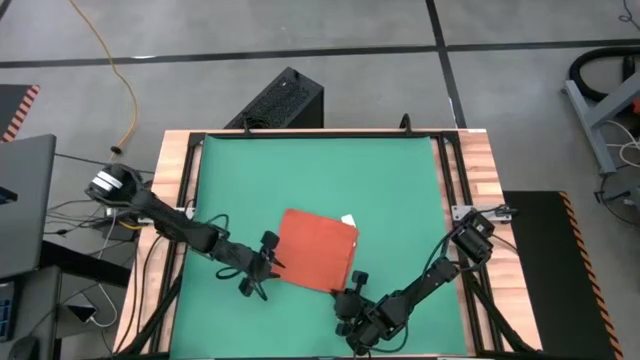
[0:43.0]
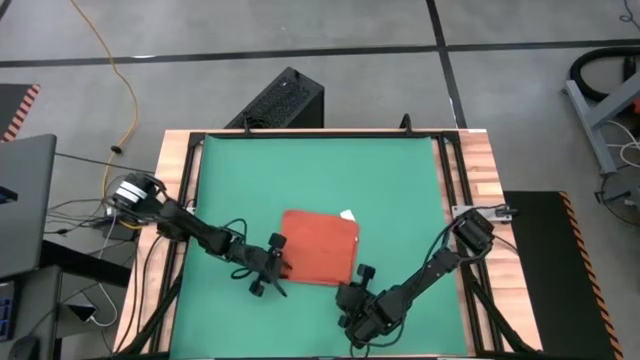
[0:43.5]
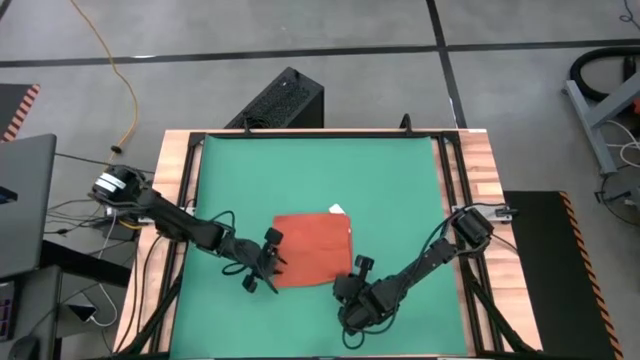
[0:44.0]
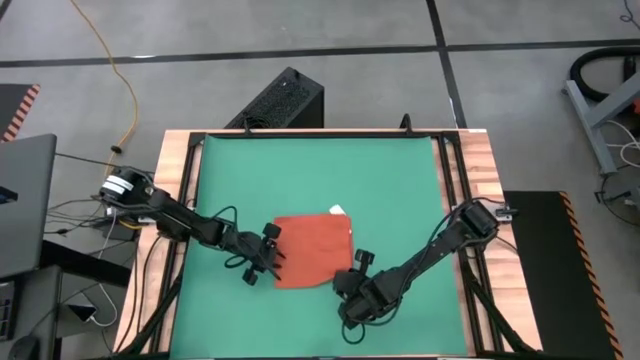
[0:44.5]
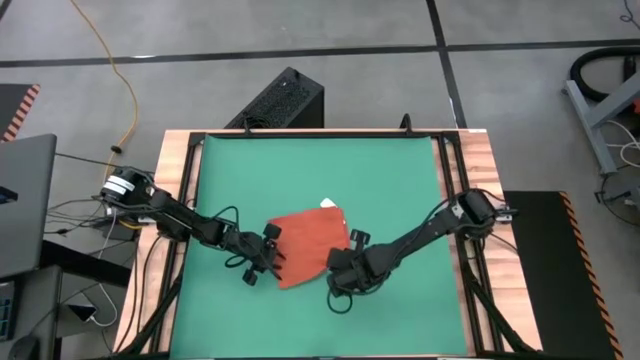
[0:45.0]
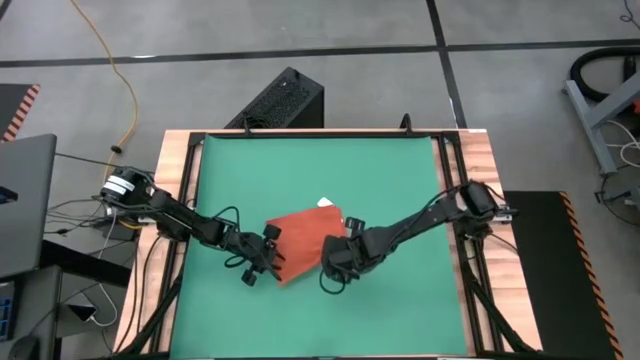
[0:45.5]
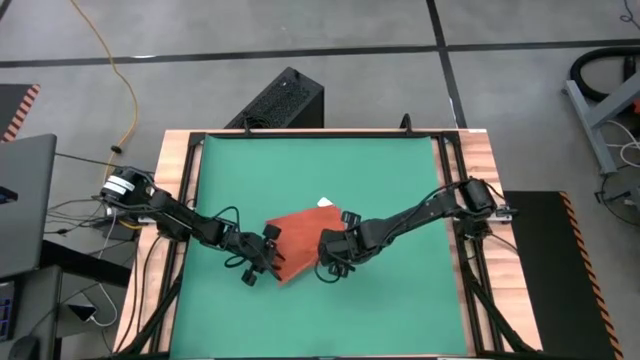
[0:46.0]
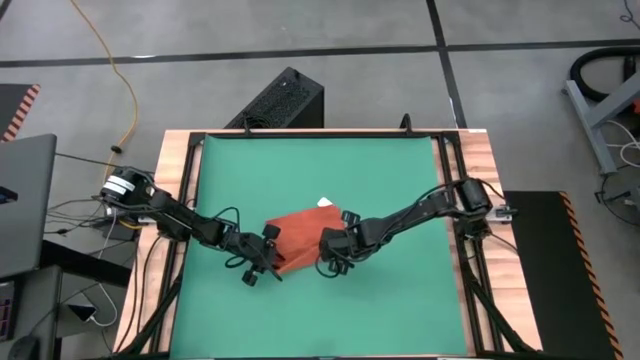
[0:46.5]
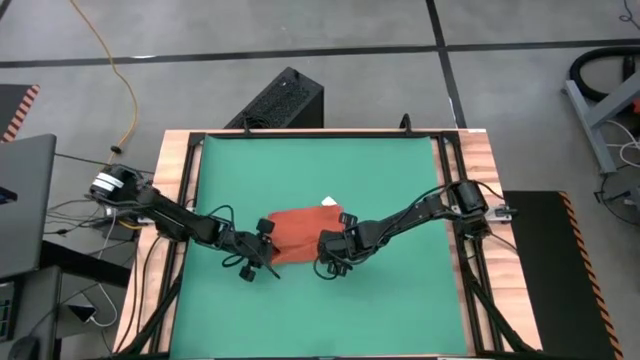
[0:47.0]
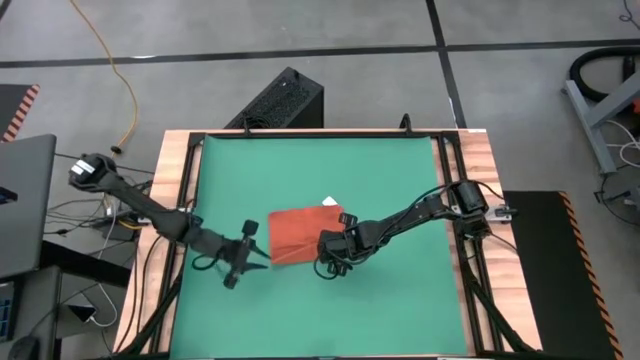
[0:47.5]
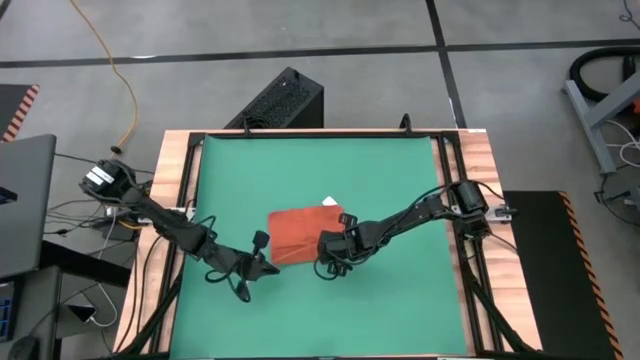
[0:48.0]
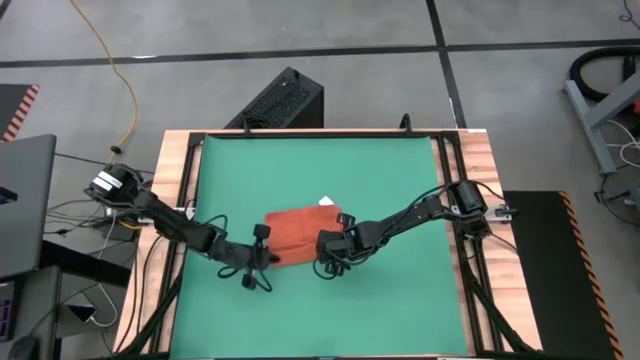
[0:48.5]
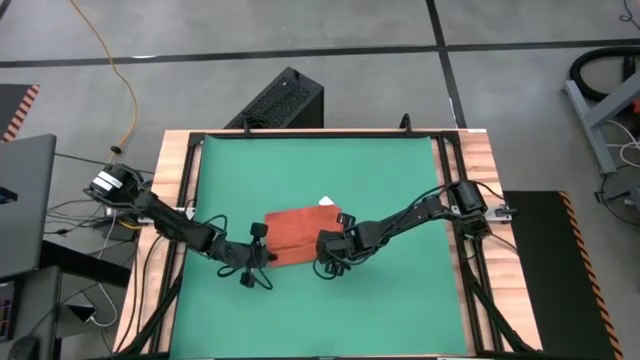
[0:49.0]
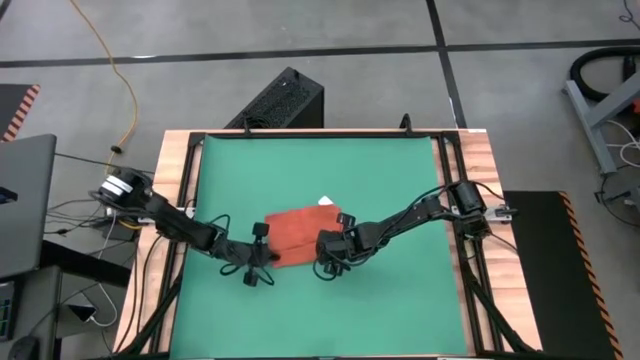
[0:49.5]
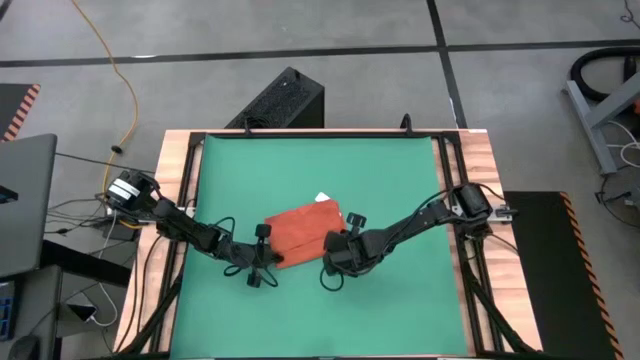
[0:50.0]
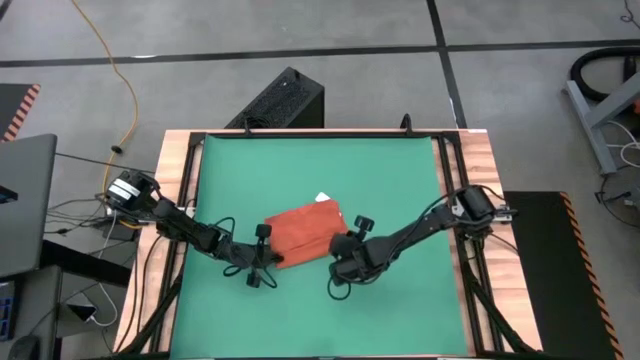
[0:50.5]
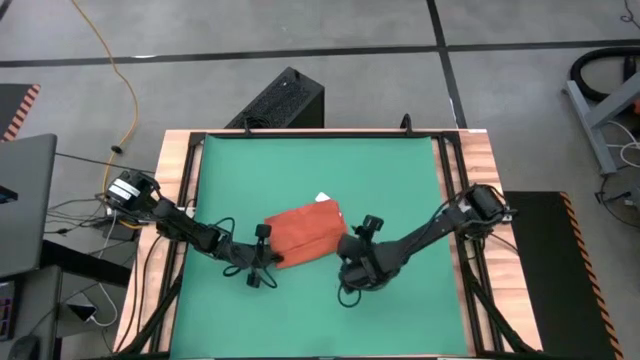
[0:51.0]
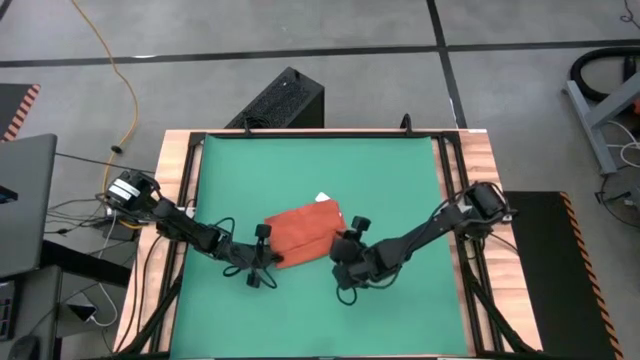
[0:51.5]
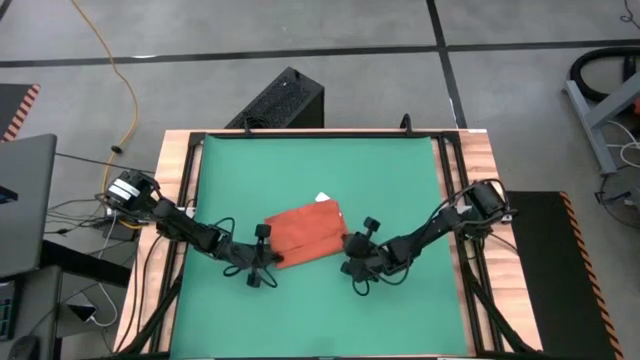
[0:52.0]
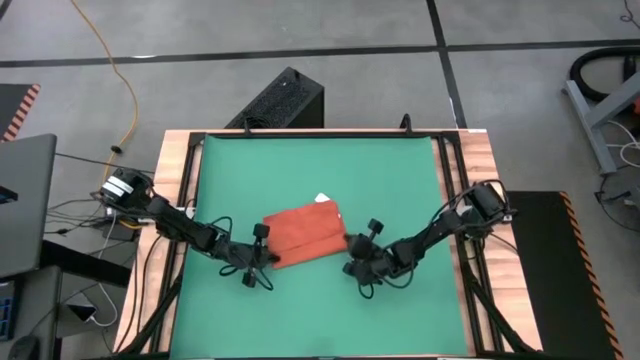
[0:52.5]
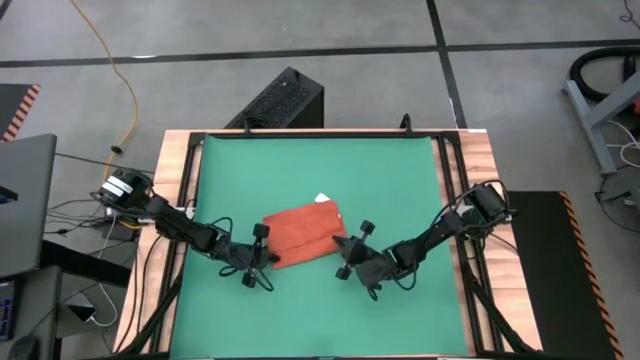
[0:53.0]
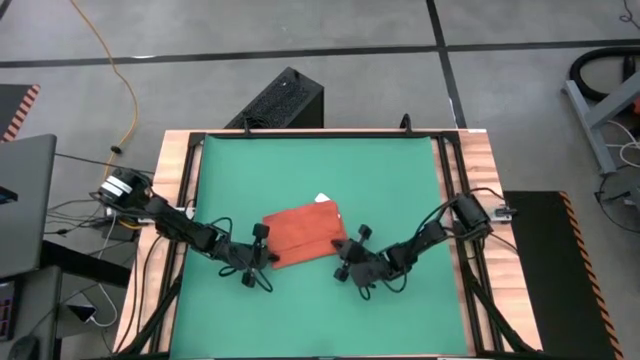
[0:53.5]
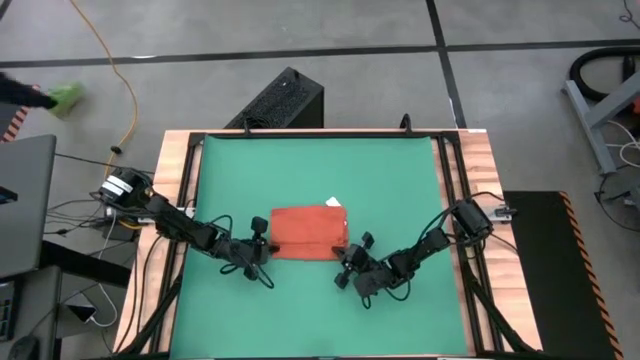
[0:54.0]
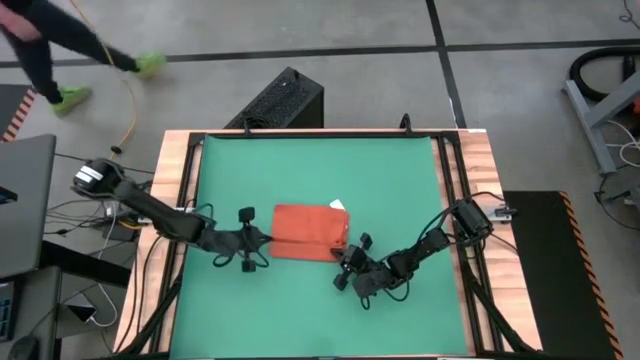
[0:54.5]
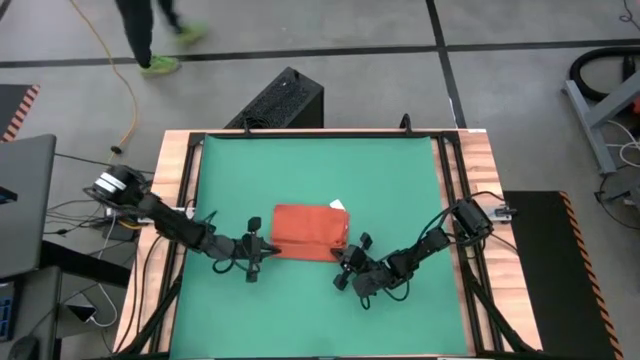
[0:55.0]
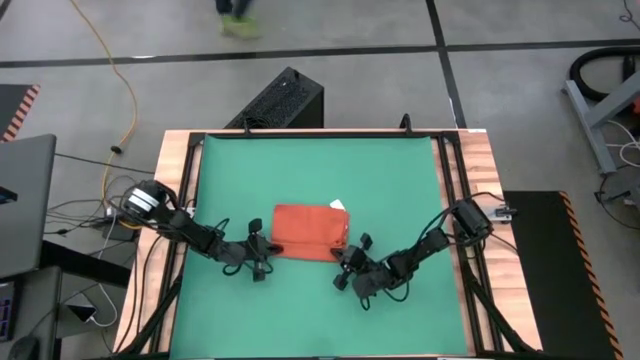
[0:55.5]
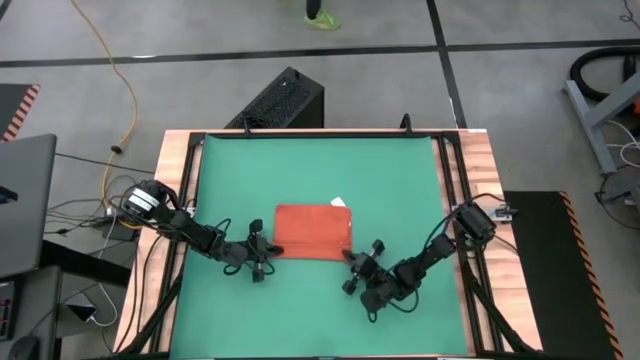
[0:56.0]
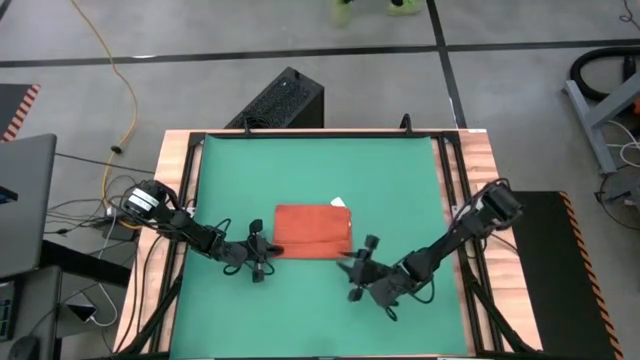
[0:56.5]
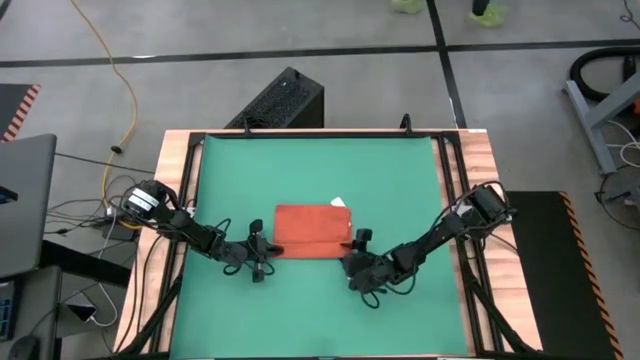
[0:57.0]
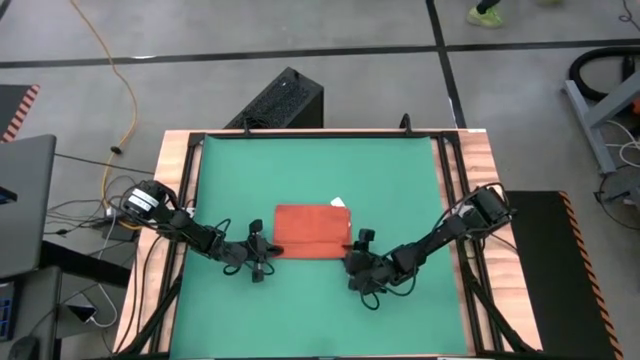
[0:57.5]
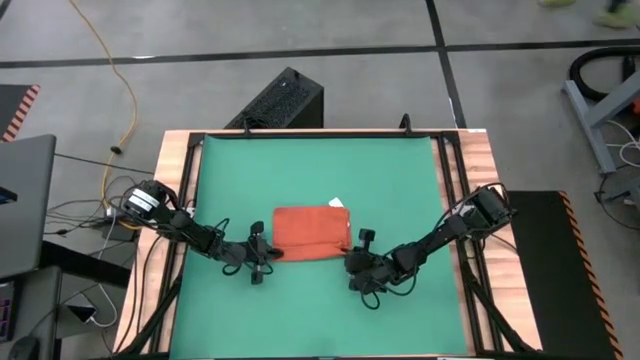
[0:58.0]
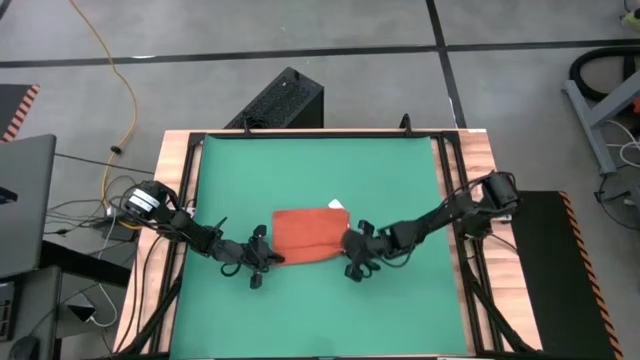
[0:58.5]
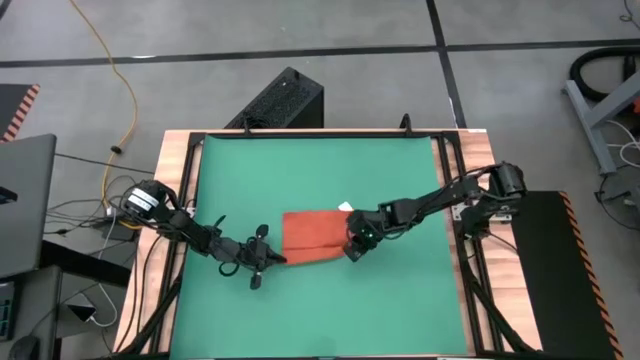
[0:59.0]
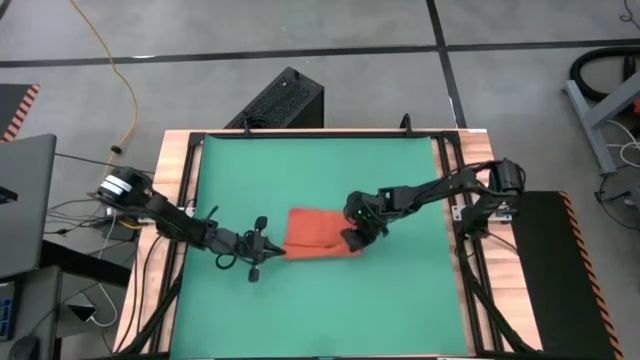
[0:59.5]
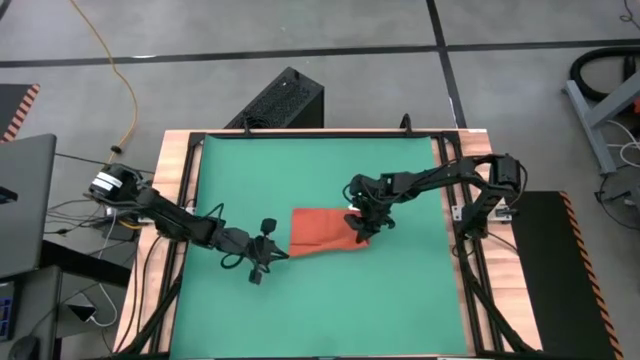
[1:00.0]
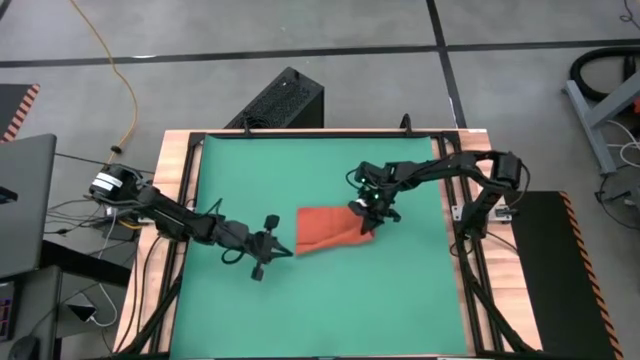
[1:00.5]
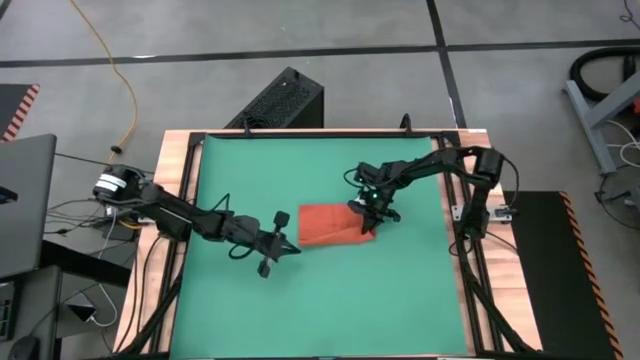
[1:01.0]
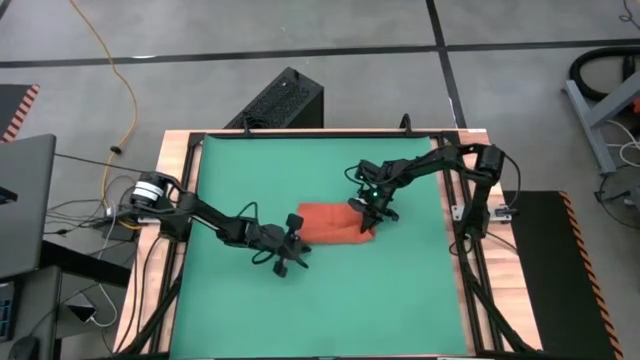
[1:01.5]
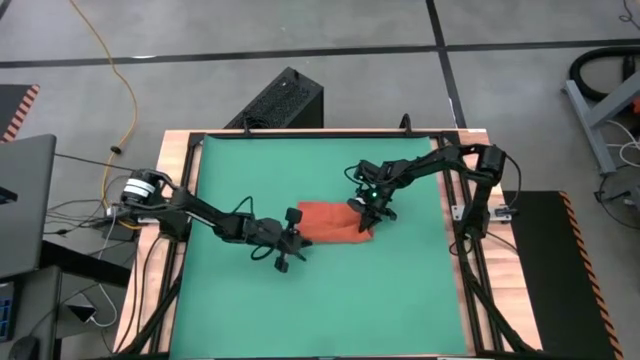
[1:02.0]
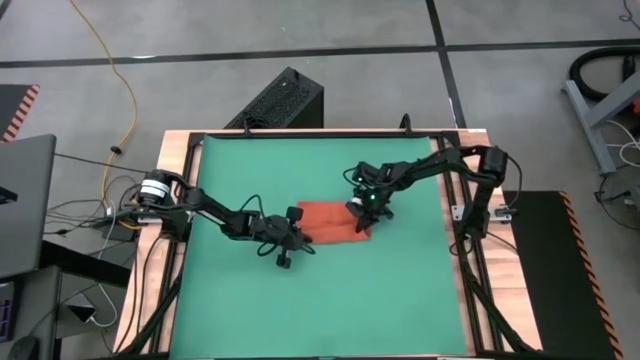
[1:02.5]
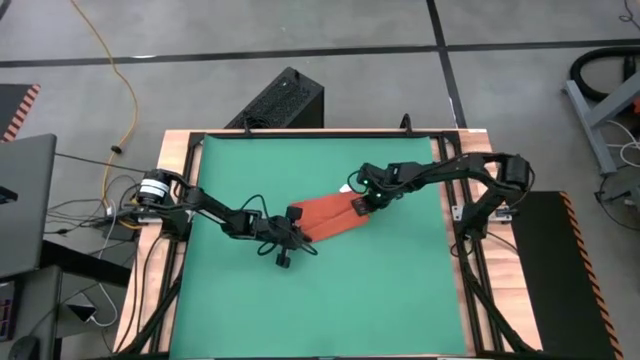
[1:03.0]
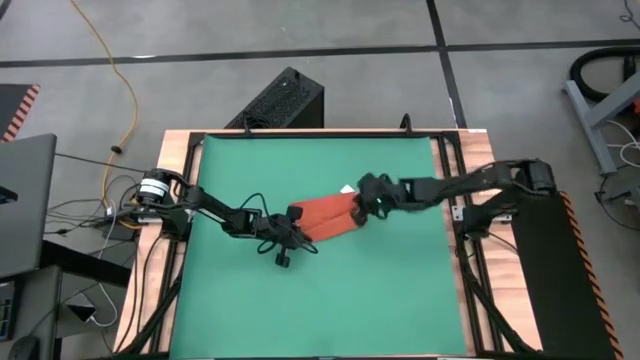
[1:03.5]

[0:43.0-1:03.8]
Task: Roll towel into tight, uniform cylinder
Roll the orange towel
